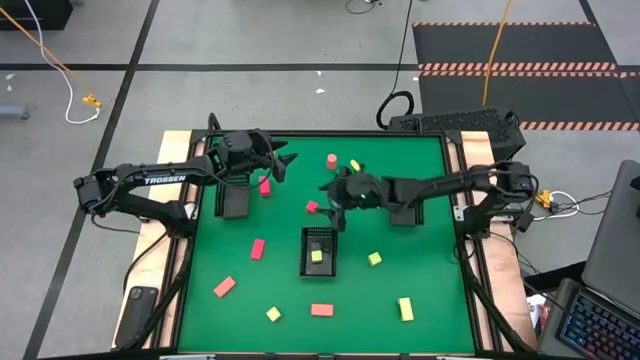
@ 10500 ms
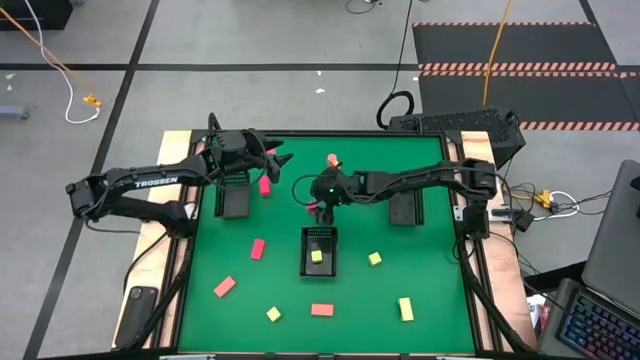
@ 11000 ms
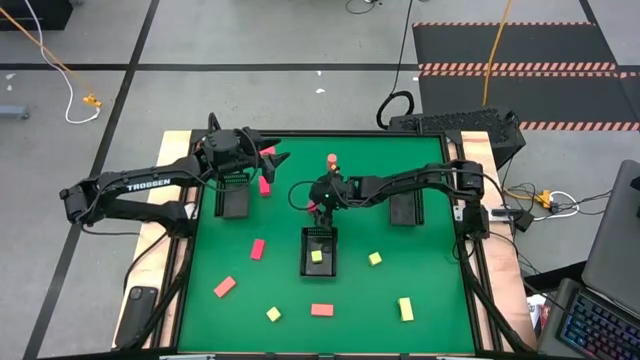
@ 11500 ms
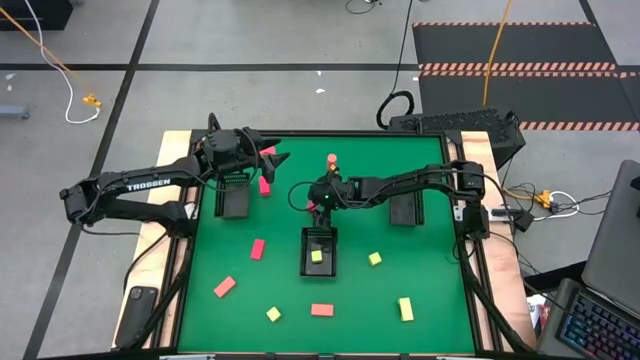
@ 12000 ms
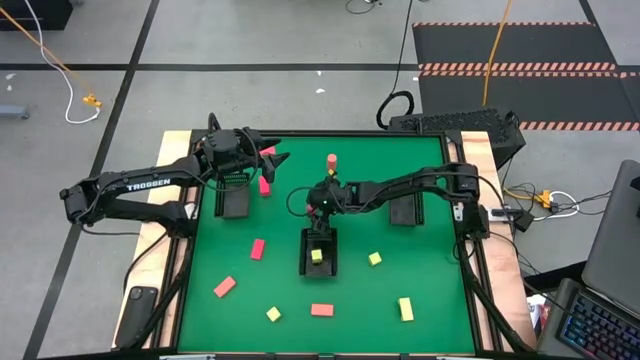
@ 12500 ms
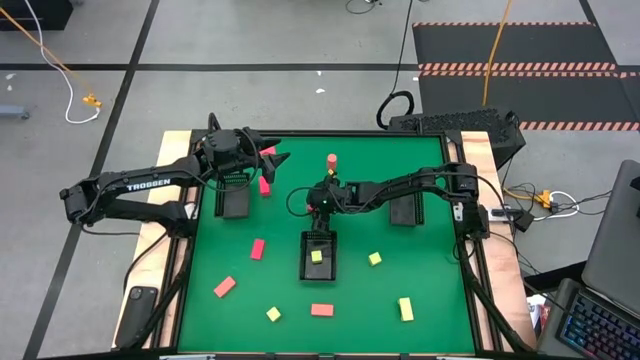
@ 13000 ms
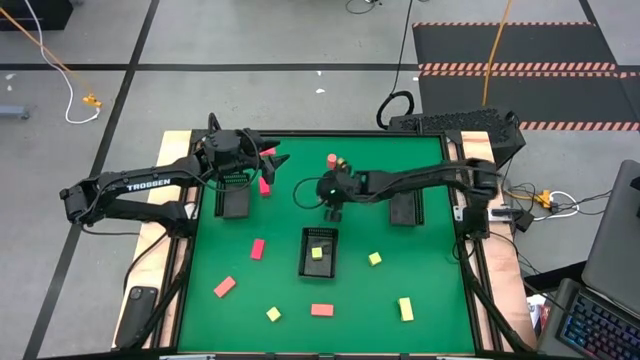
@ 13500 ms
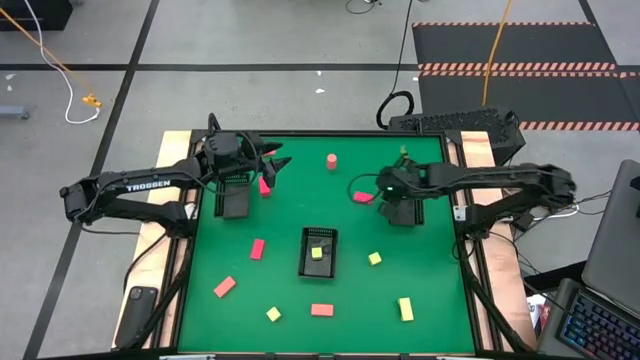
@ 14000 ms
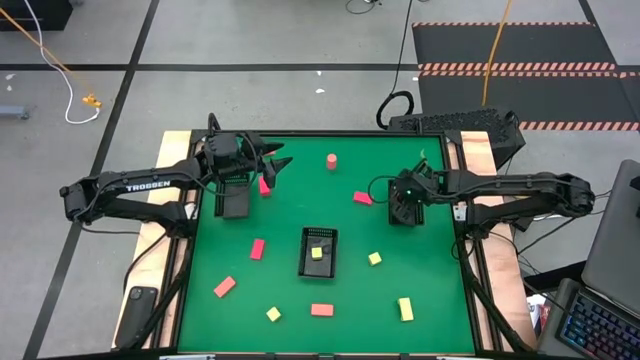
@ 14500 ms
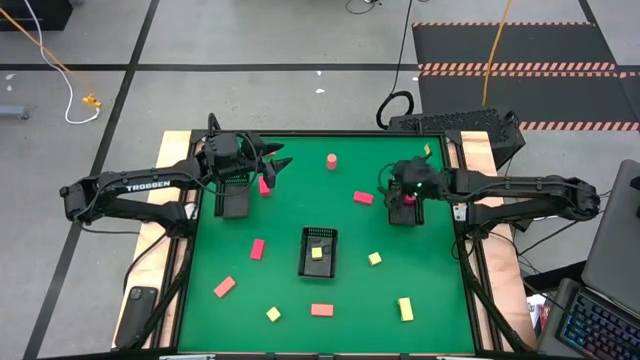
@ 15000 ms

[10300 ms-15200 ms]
Task: Sort & place blocks by color
Put the red block into the top right black basket

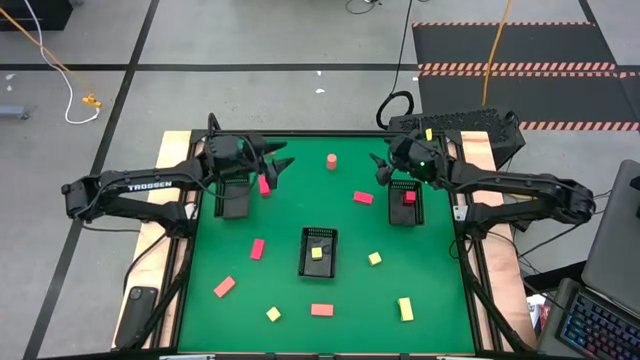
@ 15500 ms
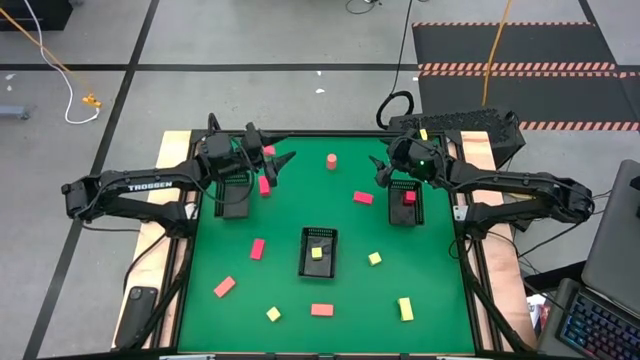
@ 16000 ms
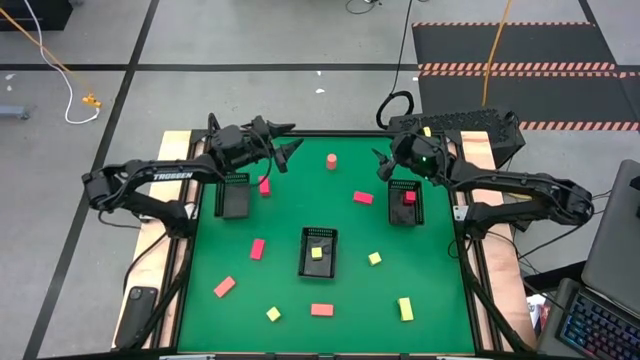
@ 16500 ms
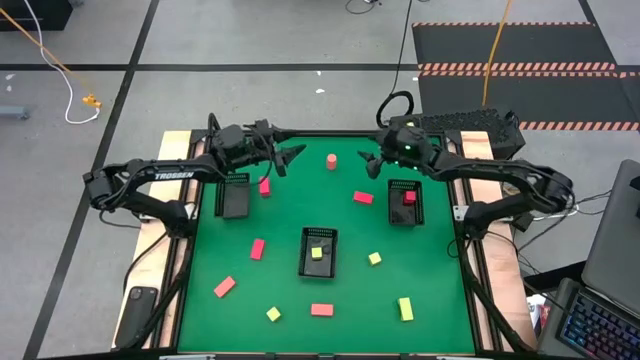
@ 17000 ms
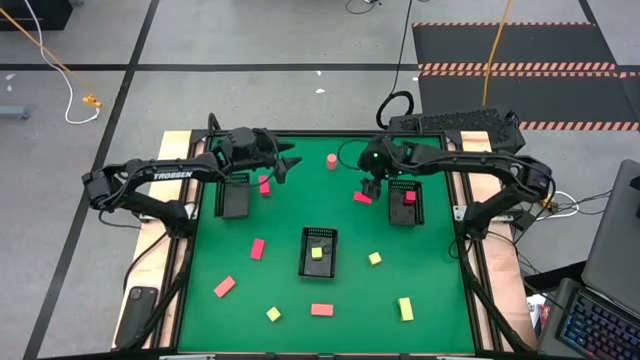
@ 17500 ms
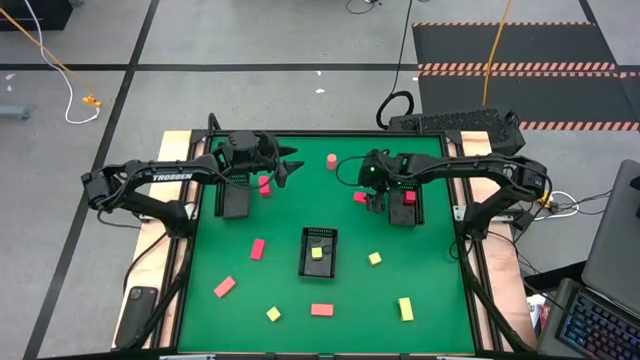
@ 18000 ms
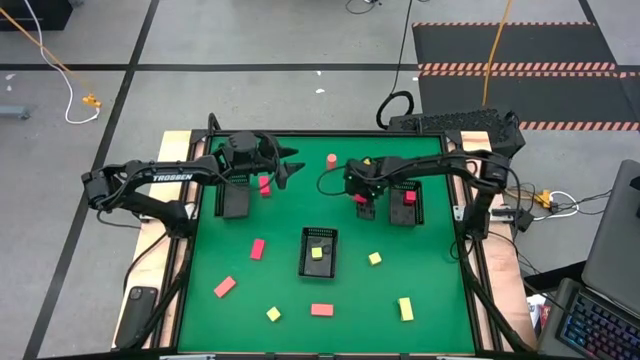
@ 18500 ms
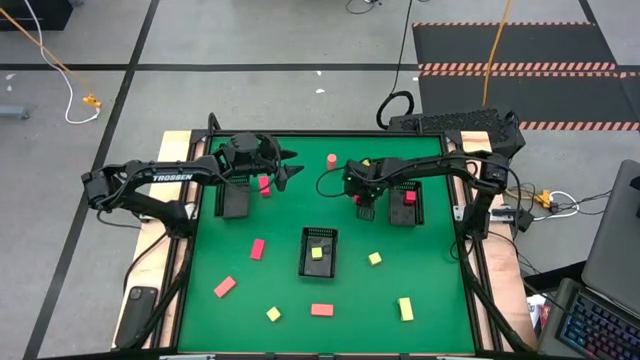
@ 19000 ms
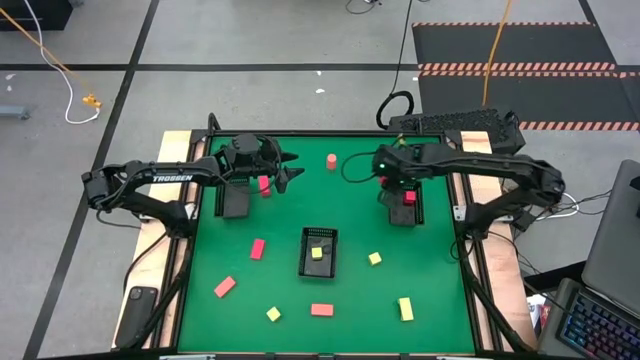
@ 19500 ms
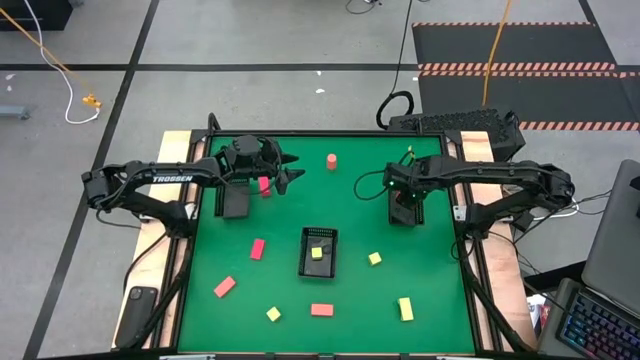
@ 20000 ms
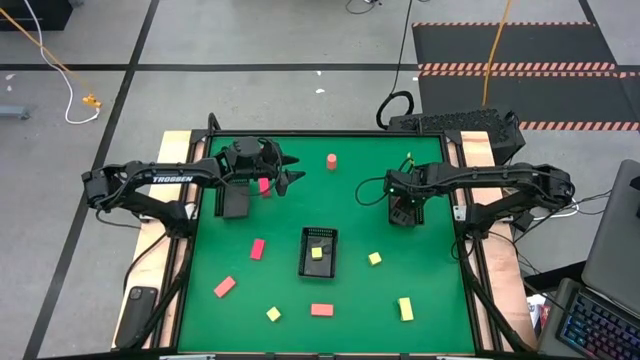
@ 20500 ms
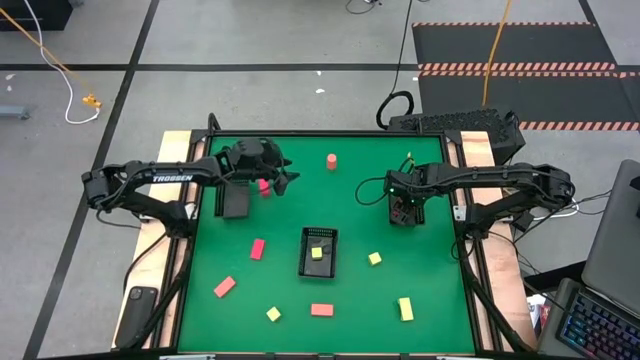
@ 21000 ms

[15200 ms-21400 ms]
Put the red block into the top right black basket

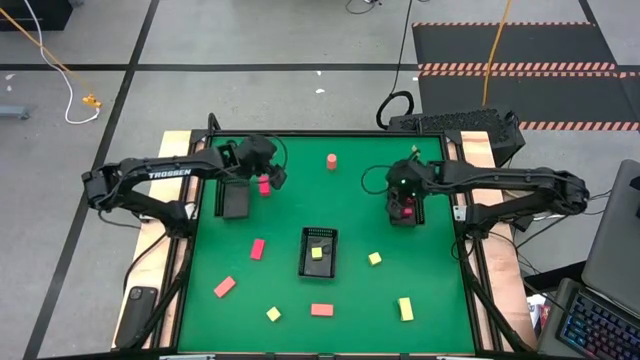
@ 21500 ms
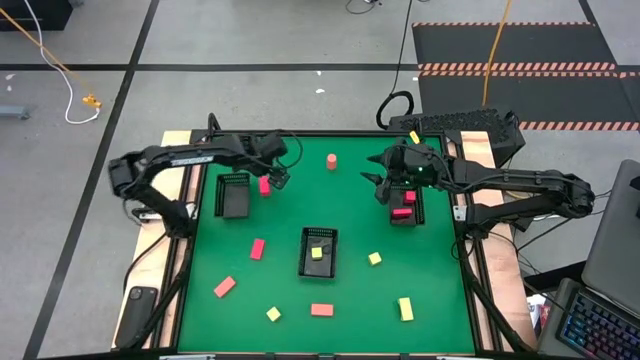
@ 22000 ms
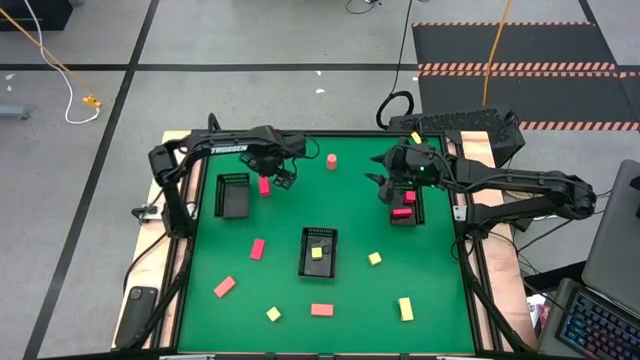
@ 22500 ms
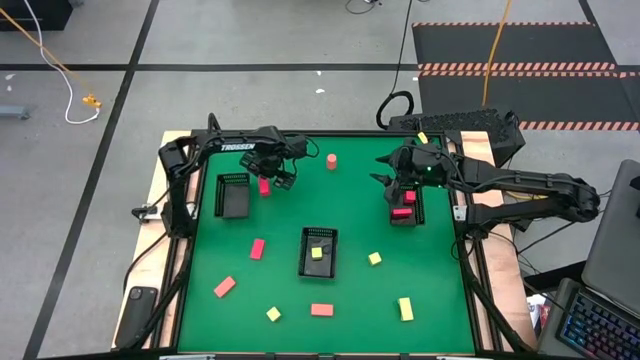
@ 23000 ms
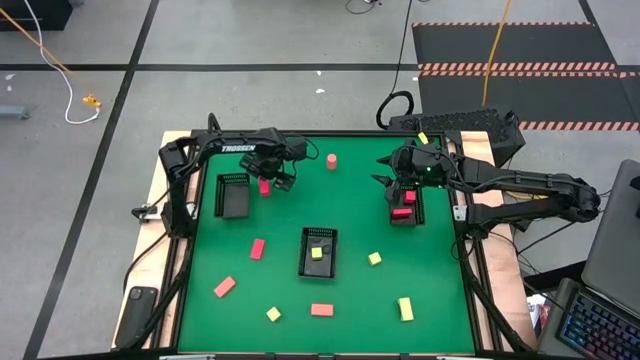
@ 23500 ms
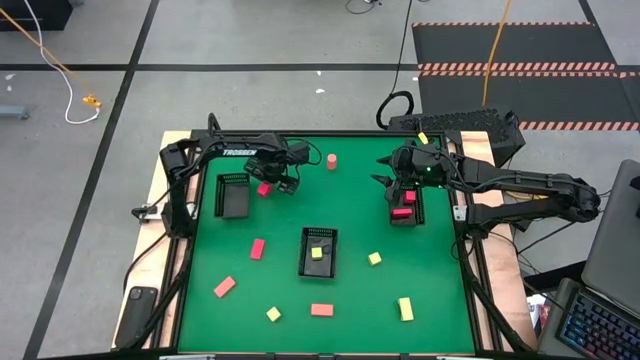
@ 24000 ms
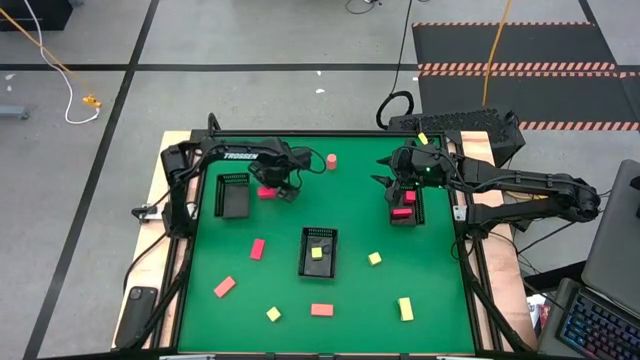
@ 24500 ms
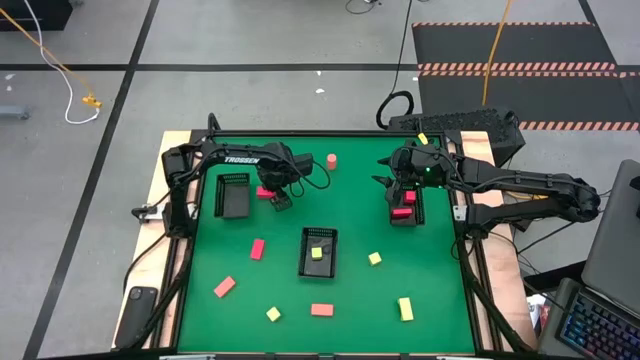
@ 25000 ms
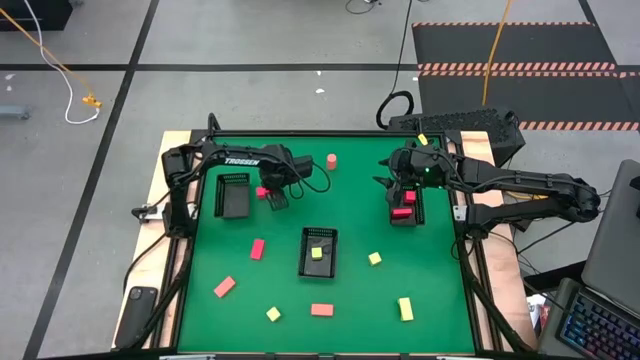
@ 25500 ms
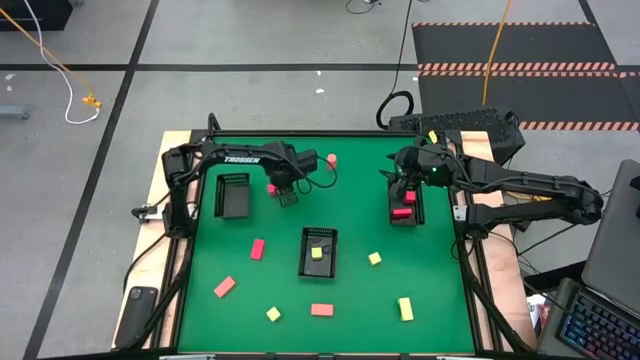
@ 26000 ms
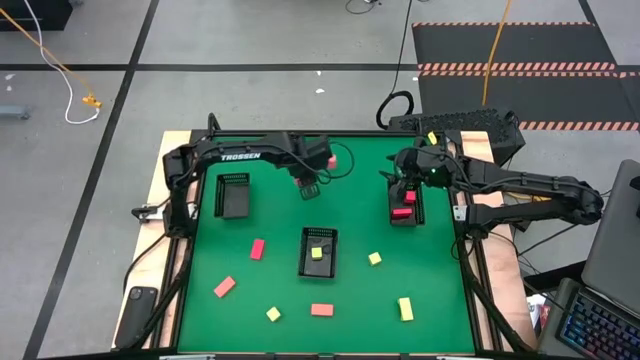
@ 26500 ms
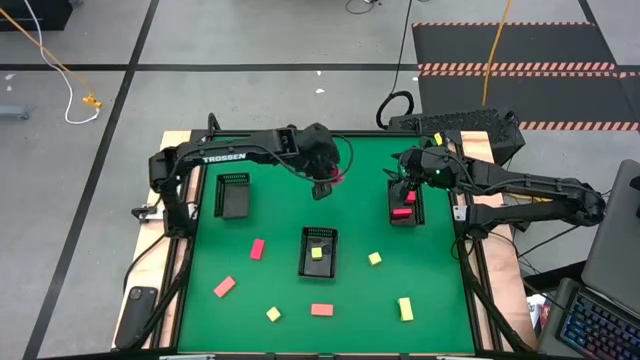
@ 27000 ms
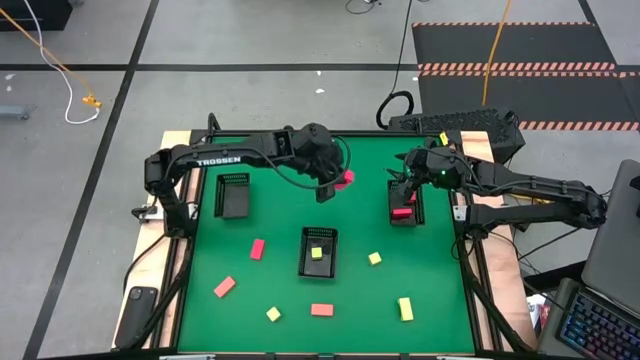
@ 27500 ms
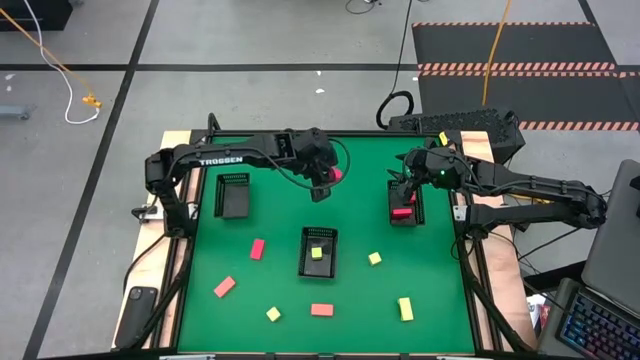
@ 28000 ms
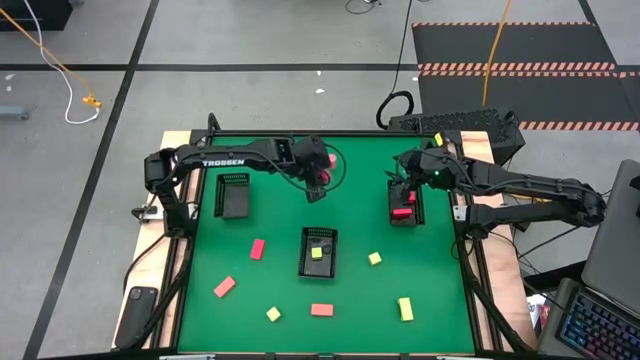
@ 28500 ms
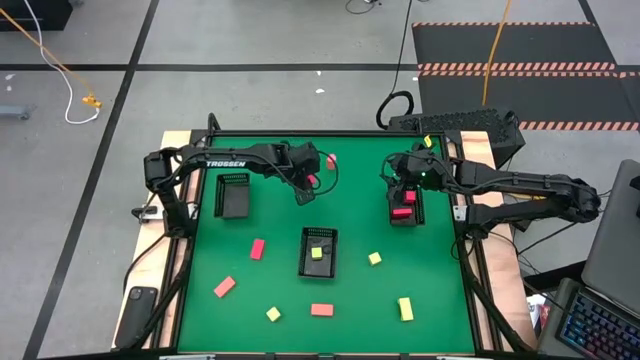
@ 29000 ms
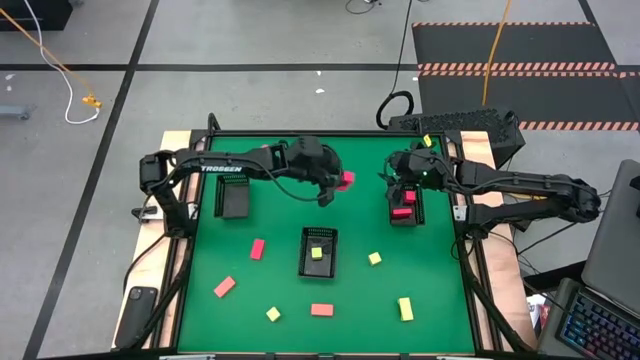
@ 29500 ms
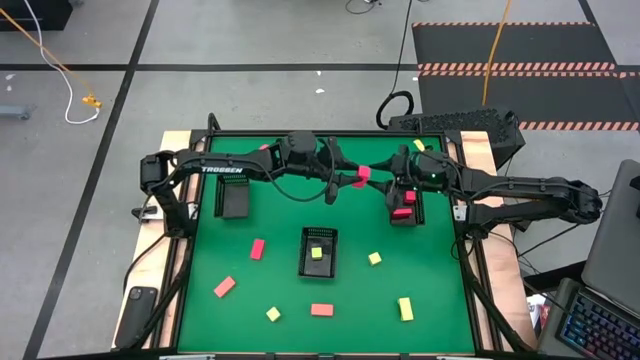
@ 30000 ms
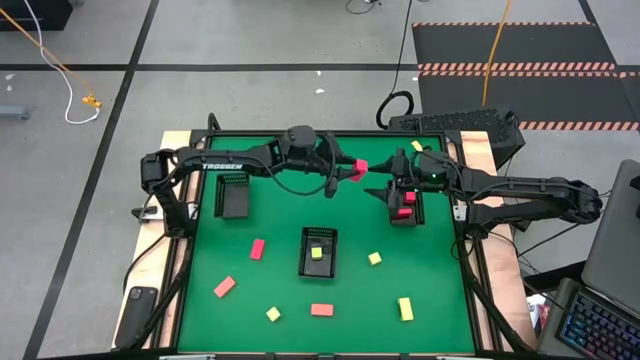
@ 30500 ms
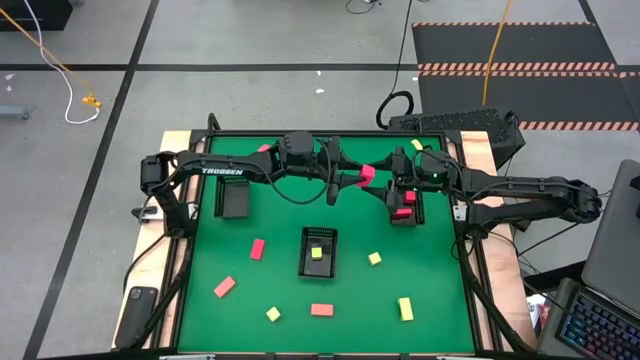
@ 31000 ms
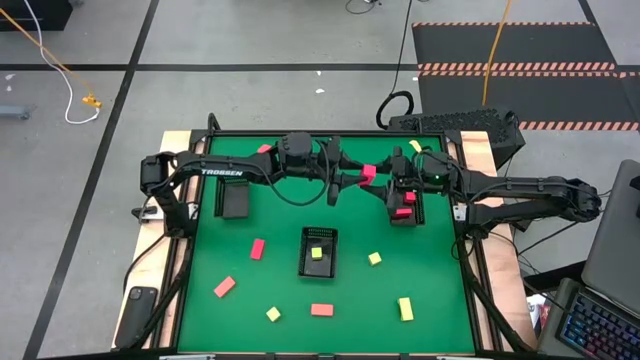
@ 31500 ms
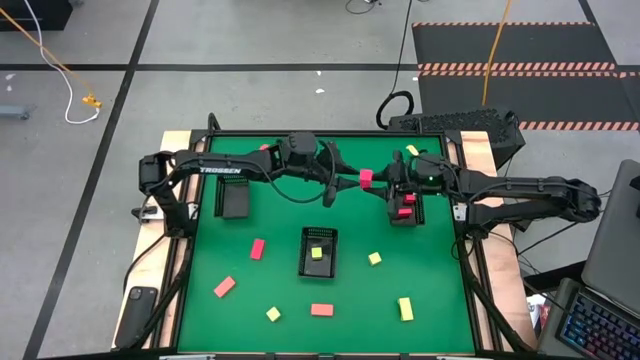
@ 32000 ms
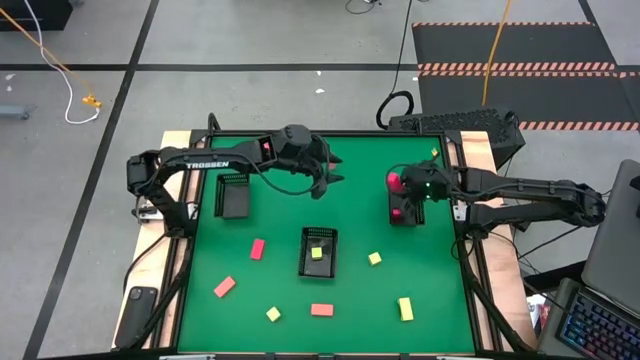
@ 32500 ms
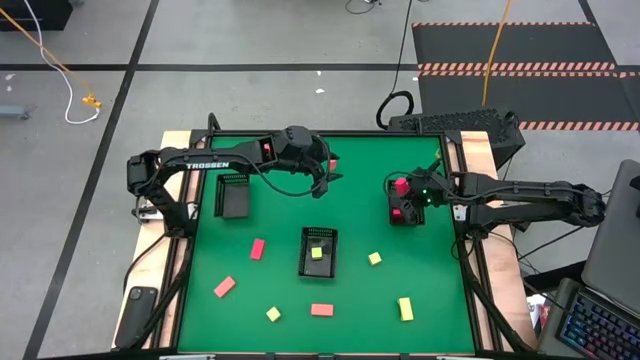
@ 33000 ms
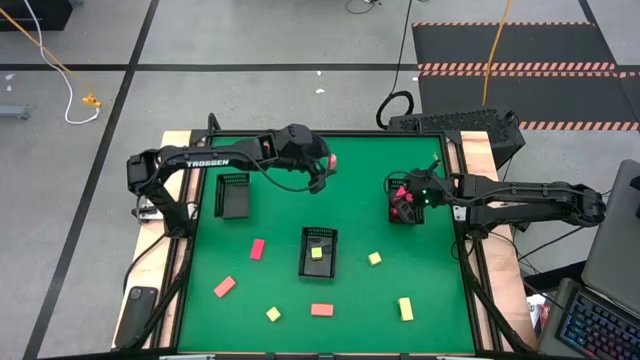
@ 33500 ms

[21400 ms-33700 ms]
Put the red block into the top right black basket
